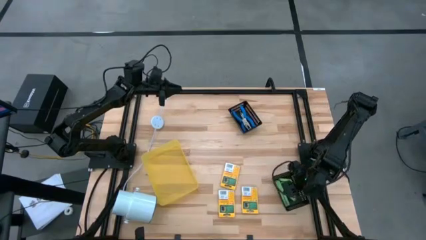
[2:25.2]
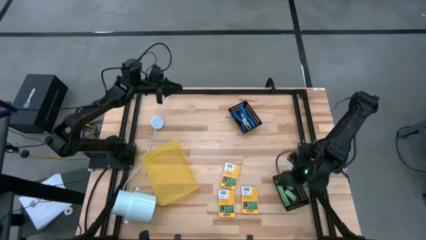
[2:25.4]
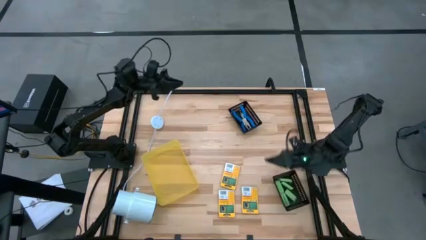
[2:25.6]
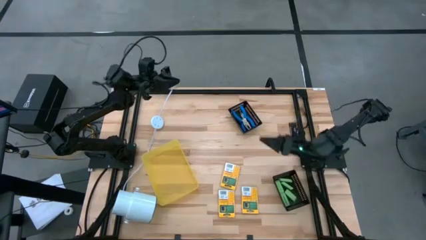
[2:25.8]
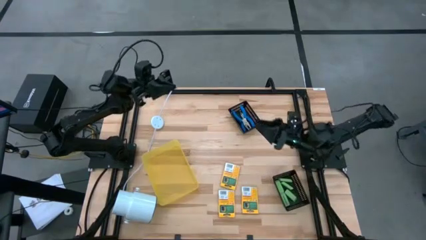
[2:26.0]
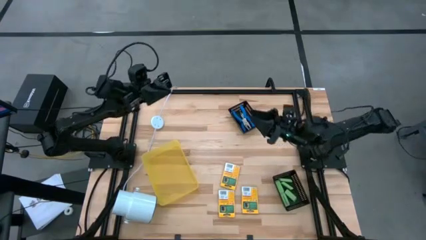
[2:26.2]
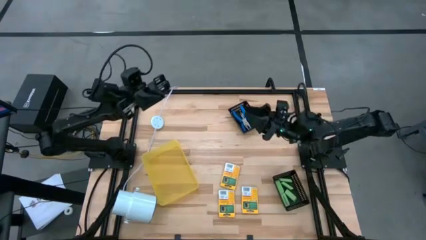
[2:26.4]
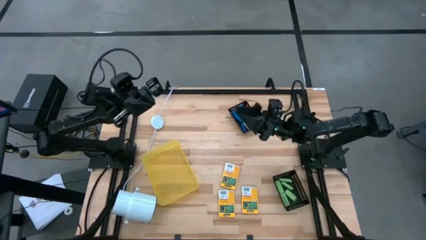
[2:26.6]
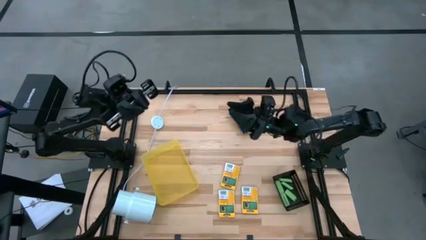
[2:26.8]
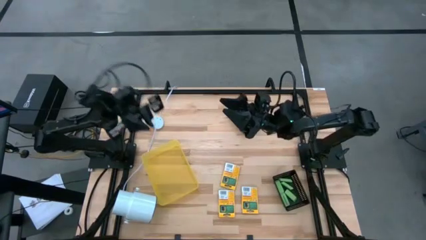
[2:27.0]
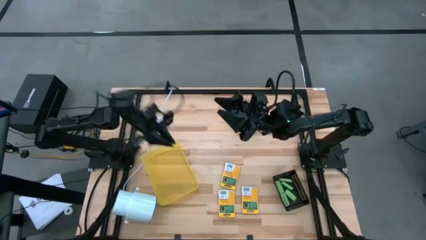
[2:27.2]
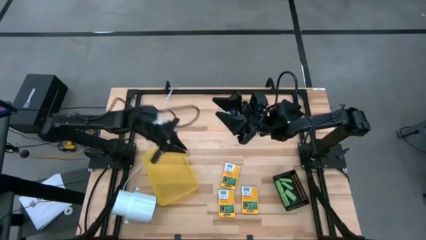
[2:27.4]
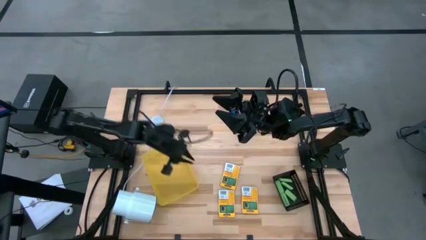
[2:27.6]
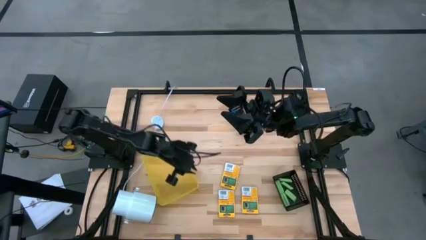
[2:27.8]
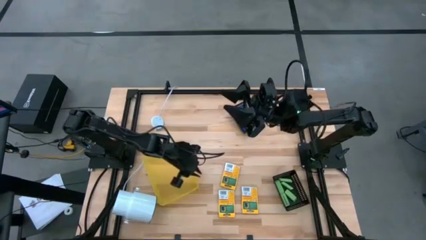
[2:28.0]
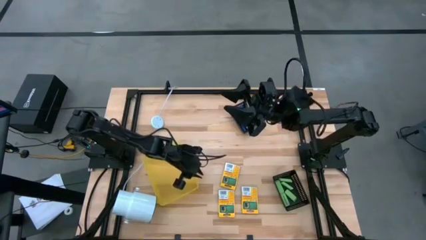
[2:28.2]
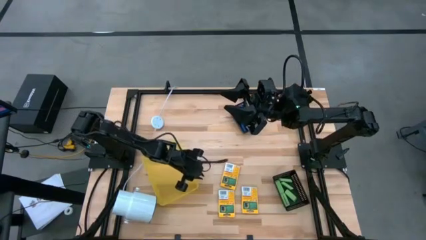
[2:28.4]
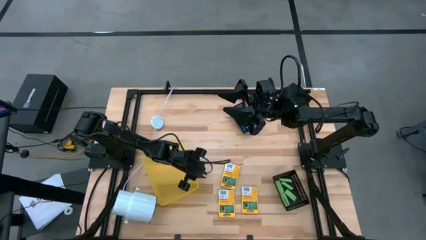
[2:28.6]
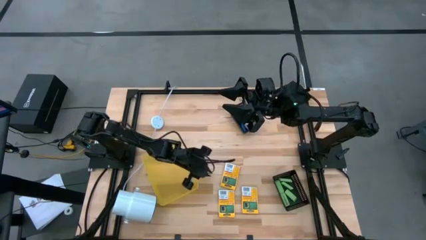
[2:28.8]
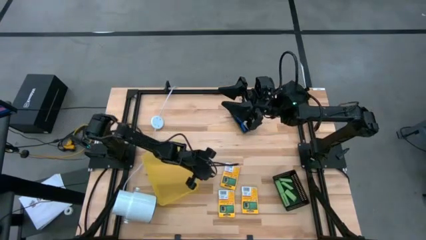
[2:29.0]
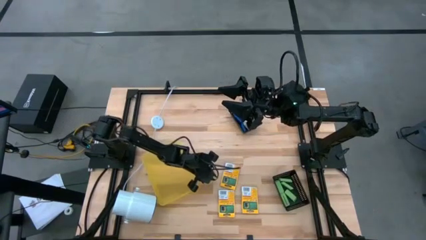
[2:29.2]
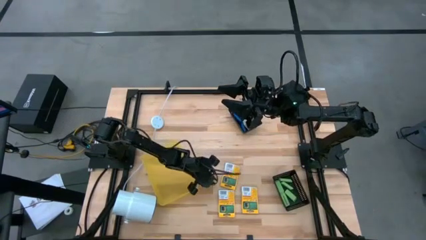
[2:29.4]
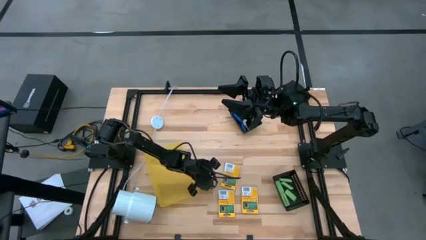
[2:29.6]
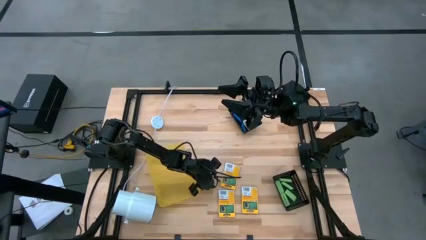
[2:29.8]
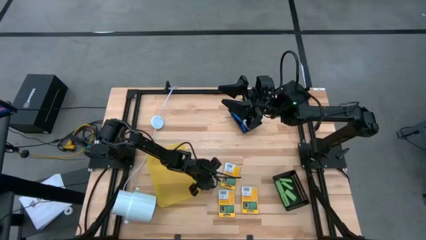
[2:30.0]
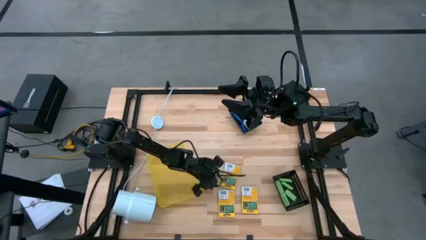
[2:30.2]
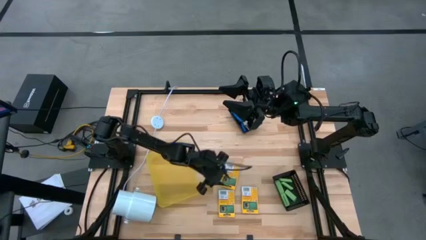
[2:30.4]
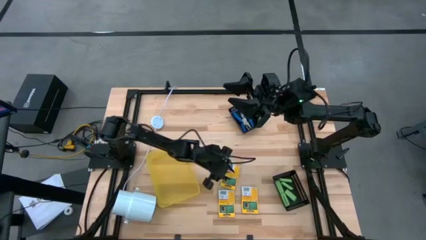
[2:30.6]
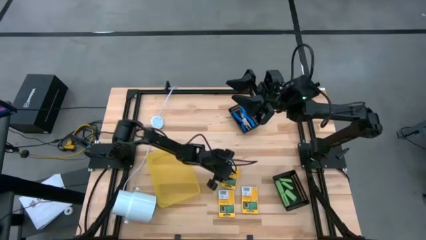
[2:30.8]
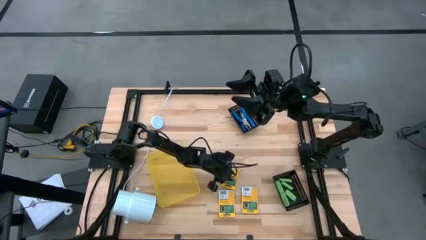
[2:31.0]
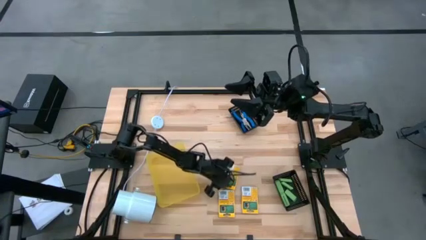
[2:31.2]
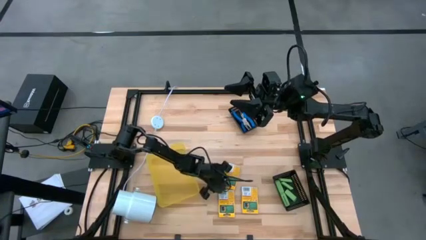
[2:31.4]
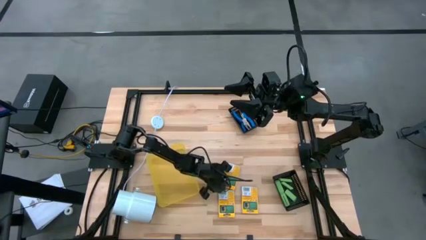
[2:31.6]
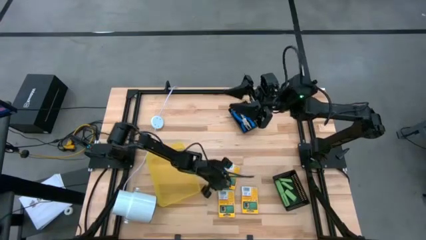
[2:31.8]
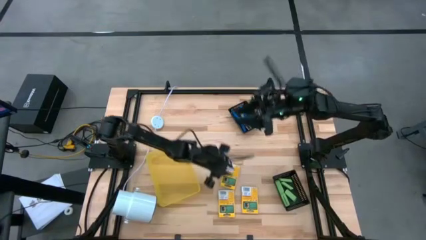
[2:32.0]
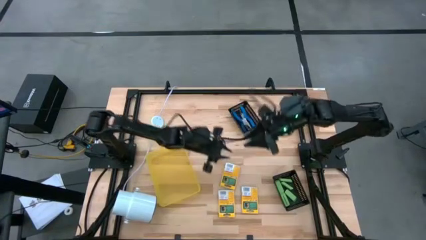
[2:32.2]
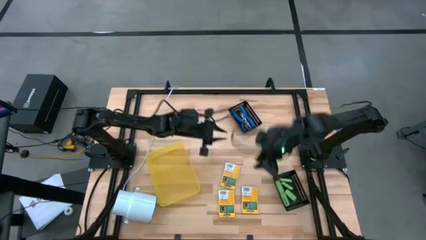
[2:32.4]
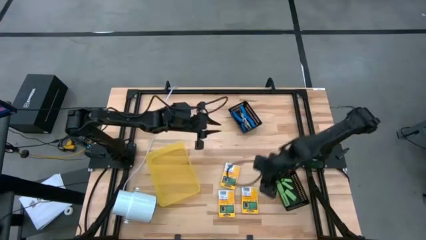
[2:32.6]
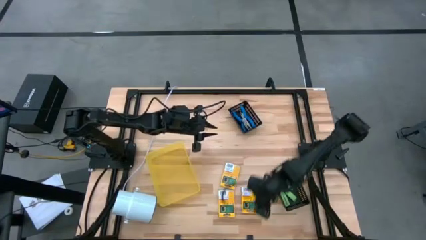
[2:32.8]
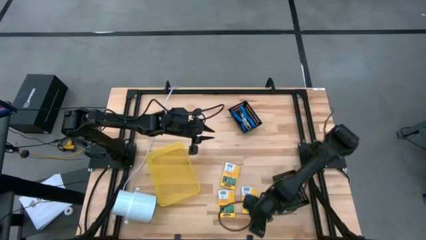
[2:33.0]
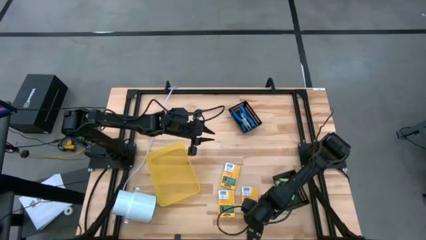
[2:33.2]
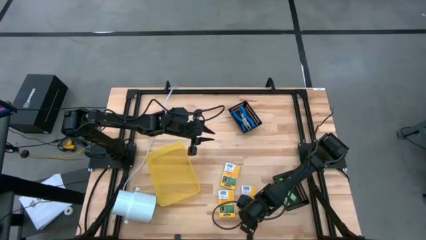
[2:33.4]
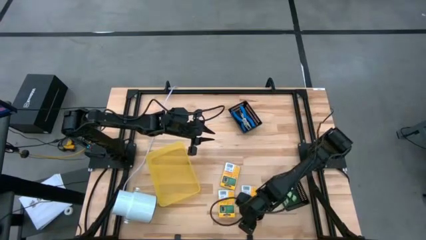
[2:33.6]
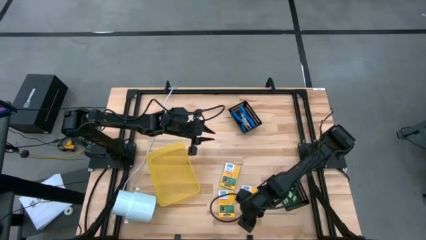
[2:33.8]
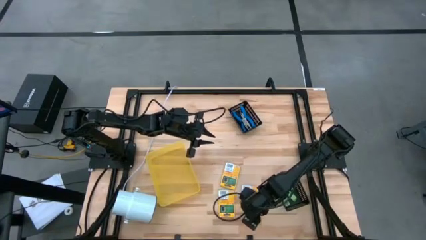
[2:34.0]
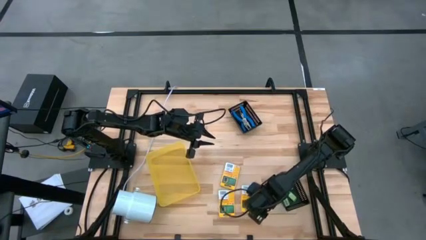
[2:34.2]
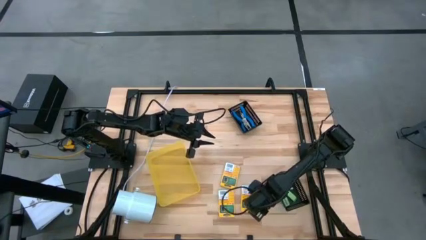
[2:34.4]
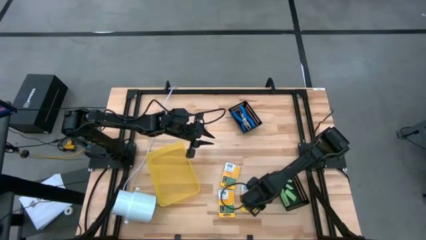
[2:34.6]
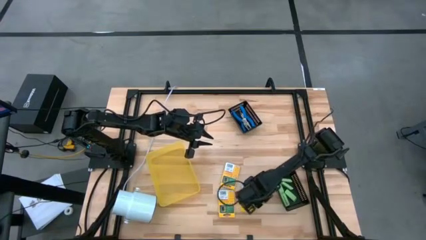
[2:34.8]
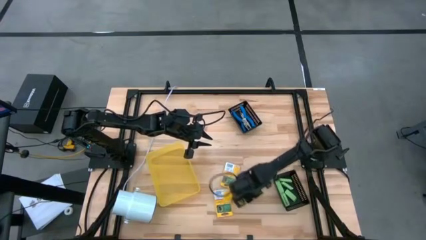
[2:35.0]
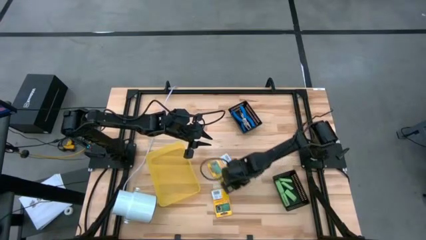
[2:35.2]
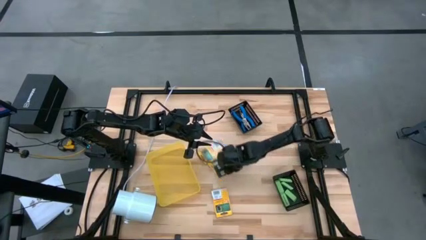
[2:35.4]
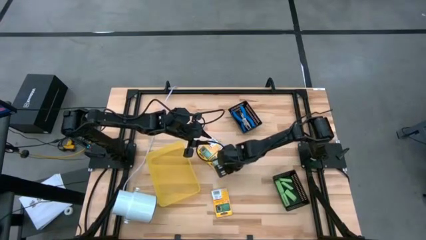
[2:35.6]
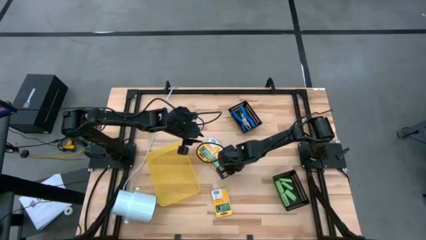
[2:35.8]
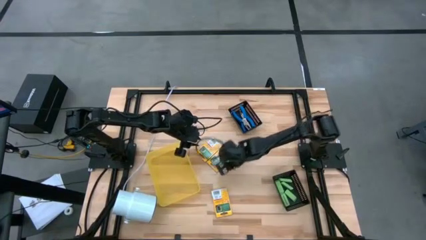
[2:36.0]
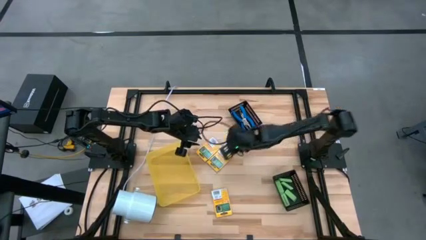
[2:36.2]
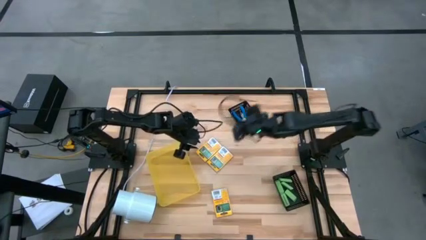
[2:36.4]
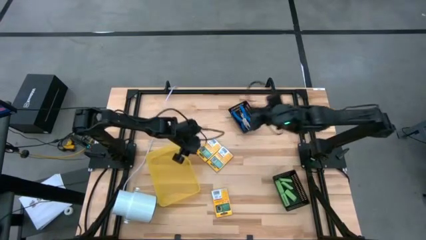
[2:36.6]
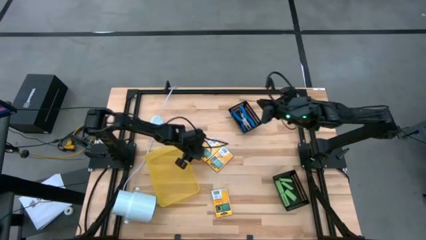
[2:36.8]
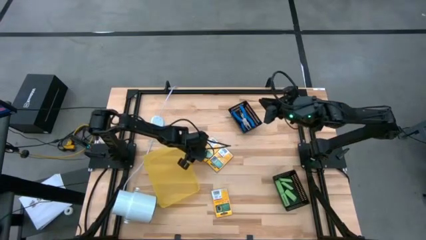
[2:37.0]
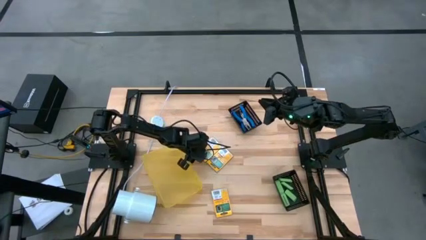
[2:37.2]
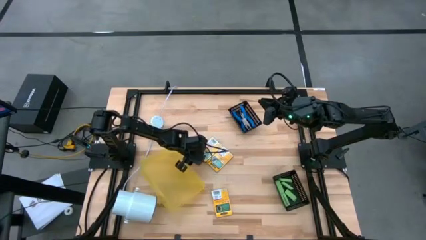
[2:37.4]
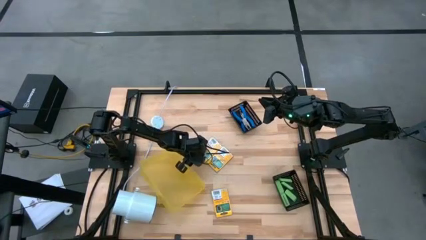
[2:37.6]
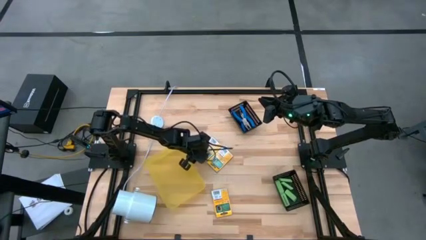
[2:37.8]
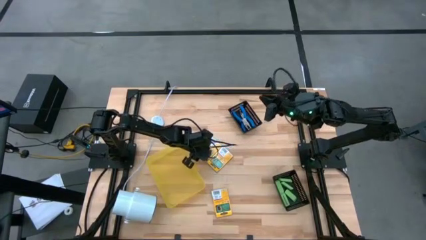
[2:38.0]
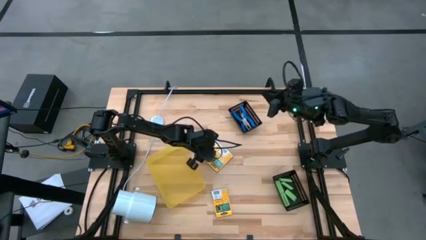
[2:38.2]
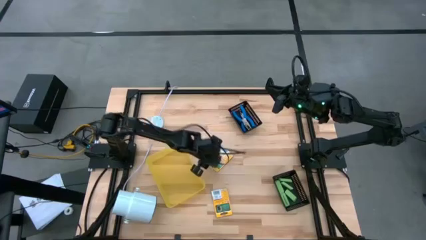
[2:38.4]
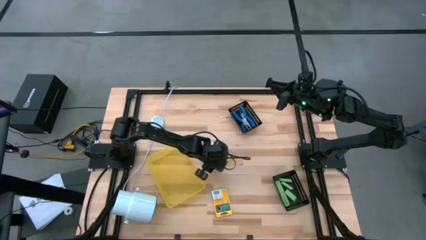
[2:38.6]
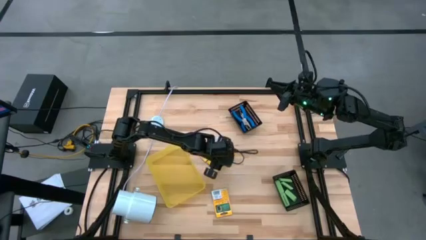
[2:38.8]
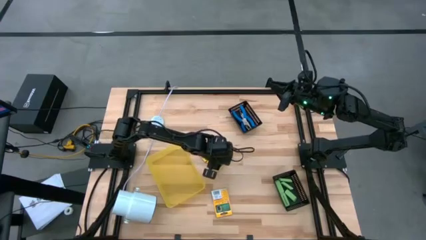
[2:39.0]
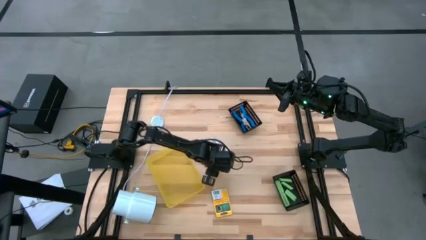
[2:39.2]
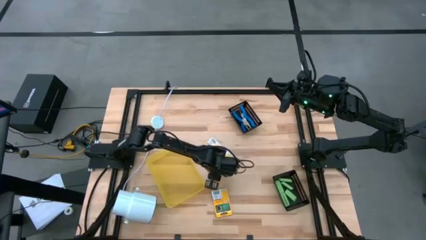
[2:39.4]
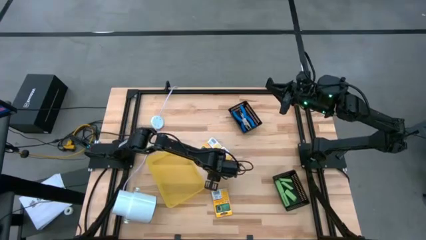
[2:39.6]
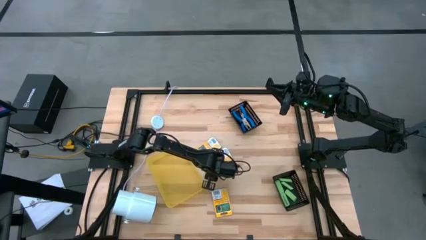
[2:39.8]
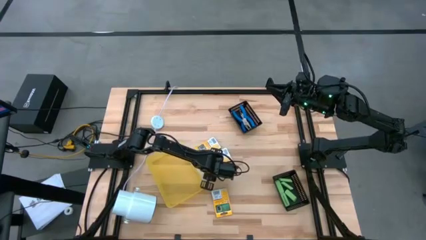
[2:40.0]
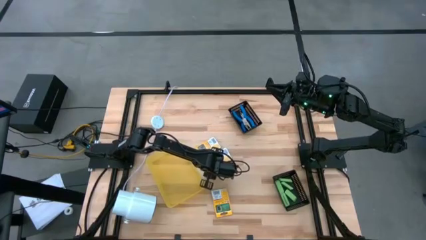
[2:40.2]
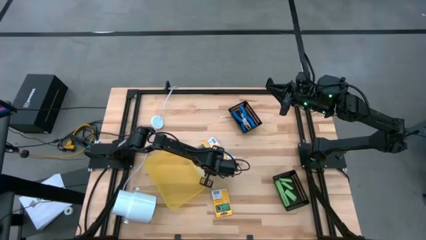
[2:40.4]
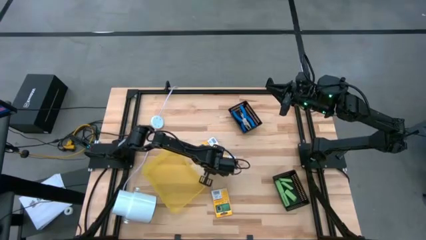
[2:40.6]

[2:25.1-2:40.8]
Task: Pick & Place School Supplies
Put the pack of crayon into the yellow bin
